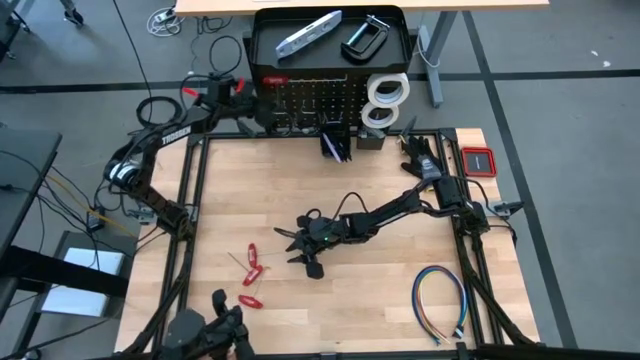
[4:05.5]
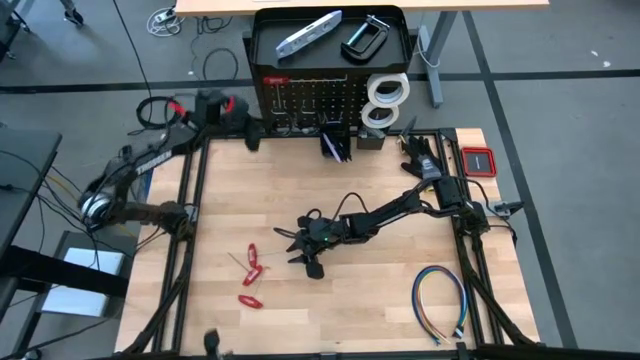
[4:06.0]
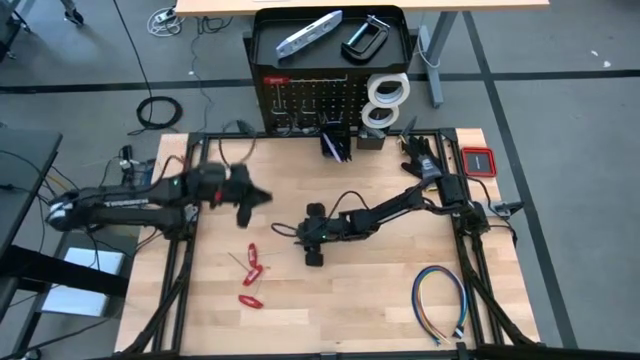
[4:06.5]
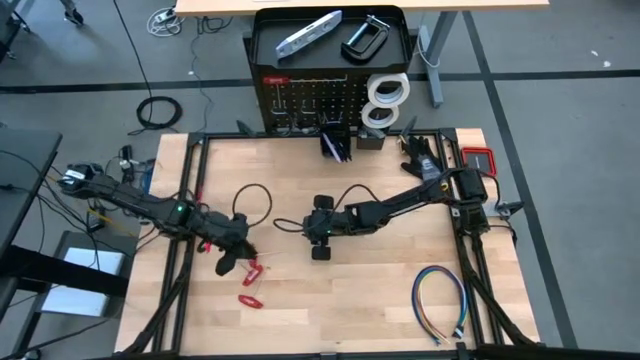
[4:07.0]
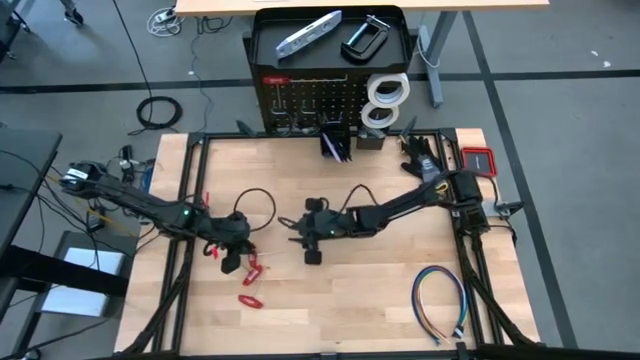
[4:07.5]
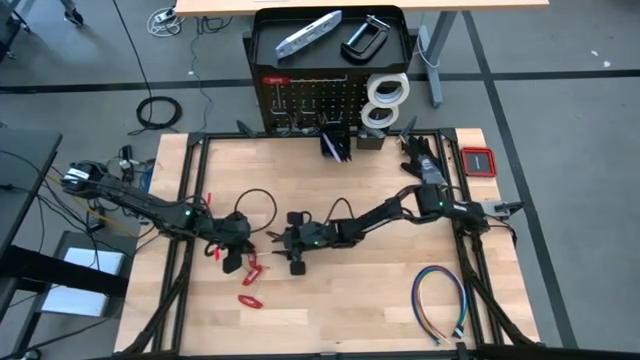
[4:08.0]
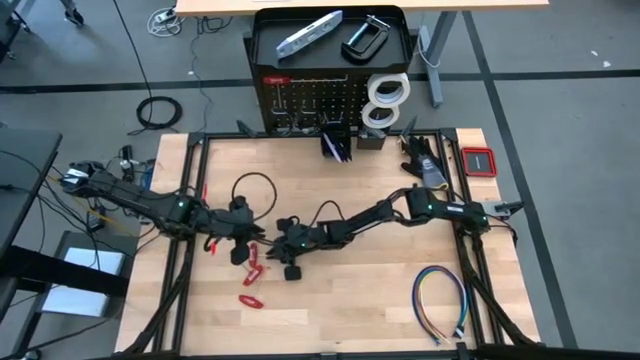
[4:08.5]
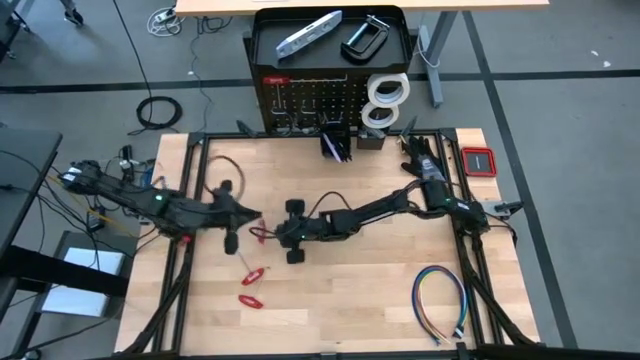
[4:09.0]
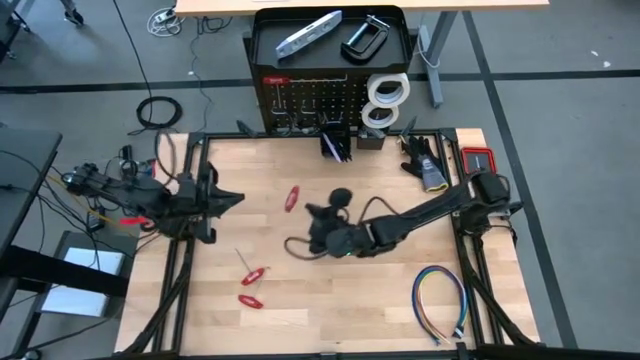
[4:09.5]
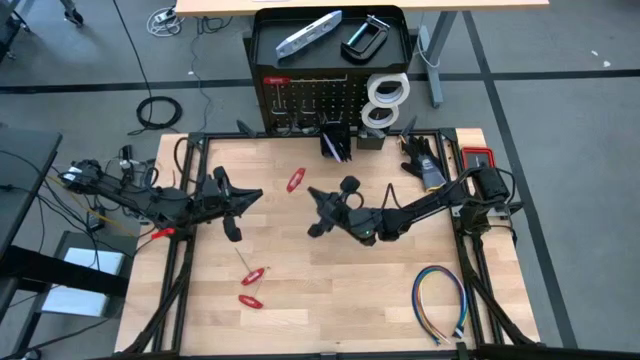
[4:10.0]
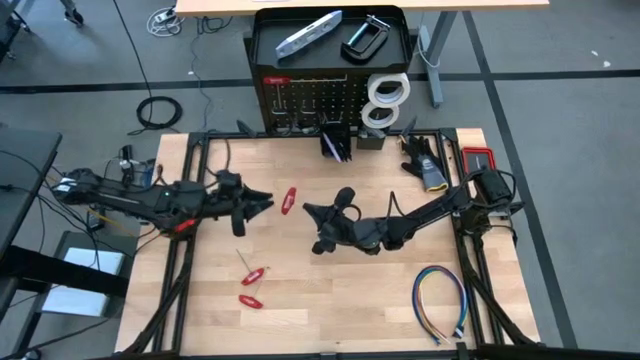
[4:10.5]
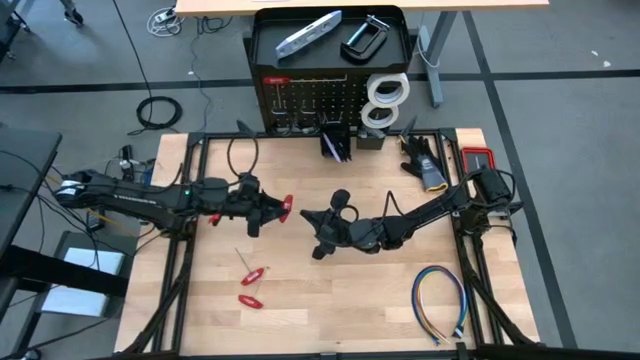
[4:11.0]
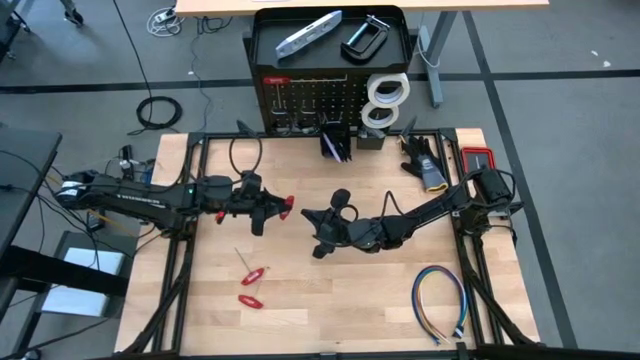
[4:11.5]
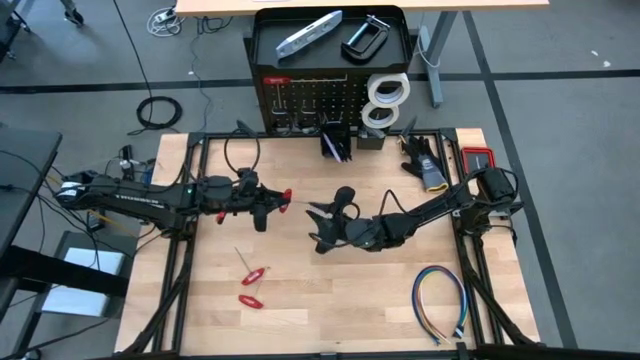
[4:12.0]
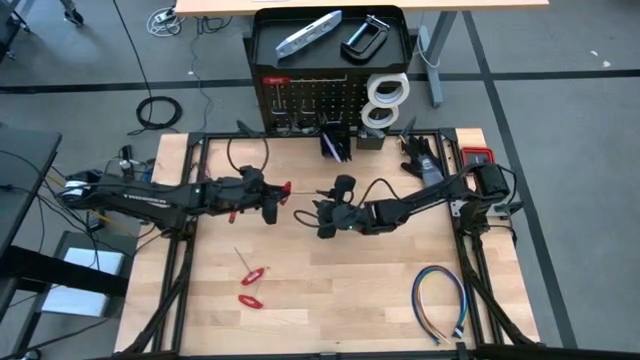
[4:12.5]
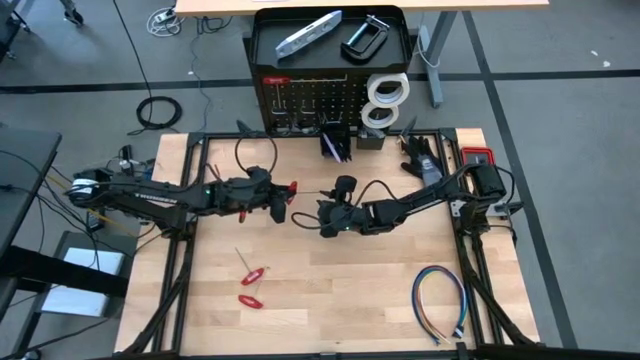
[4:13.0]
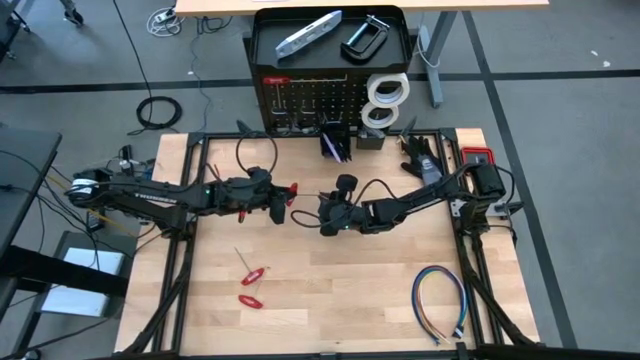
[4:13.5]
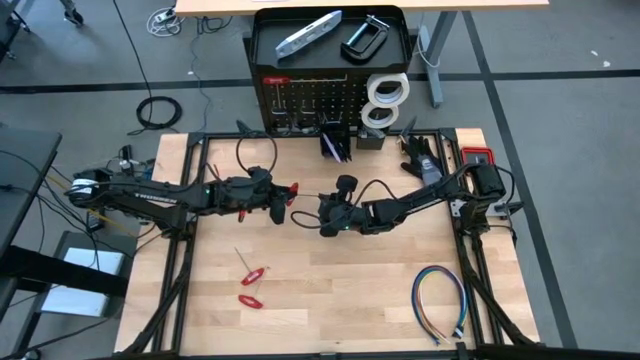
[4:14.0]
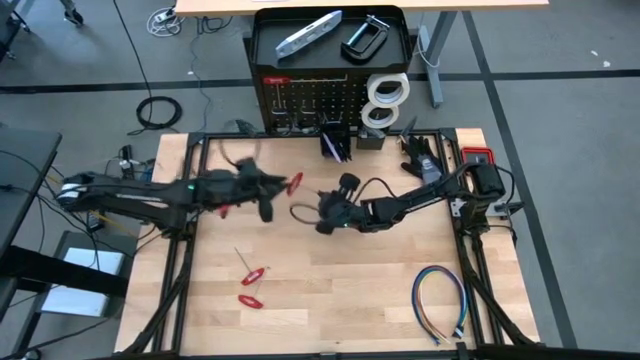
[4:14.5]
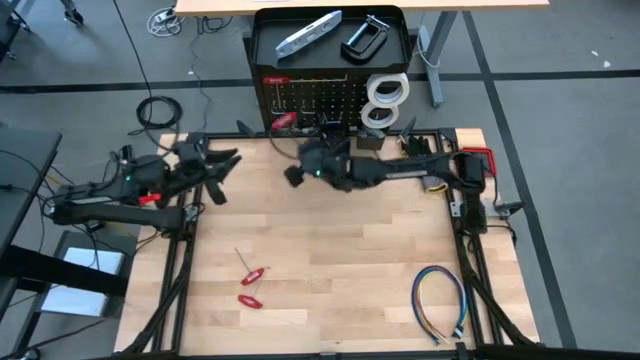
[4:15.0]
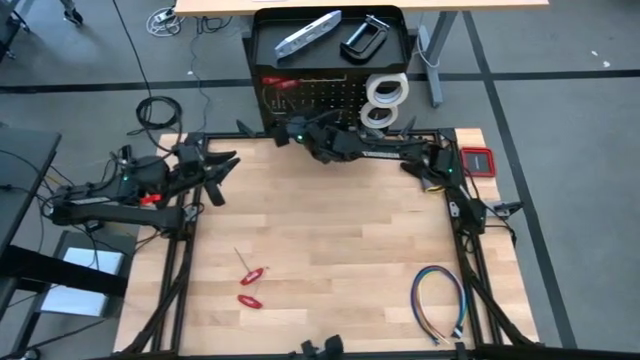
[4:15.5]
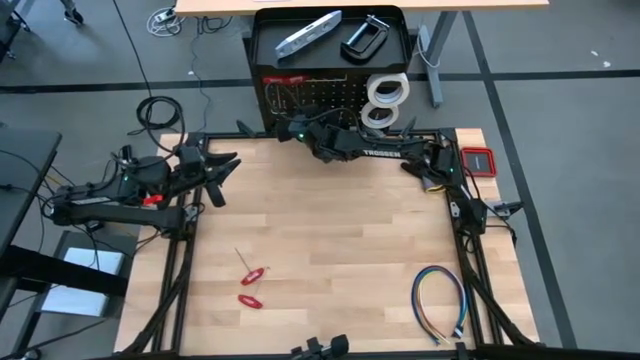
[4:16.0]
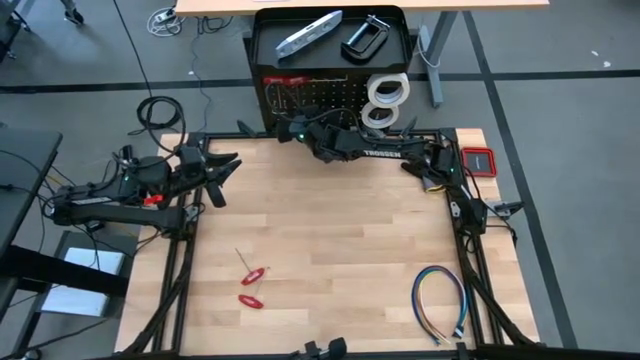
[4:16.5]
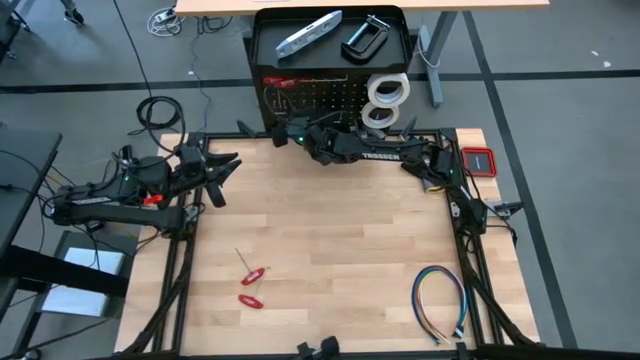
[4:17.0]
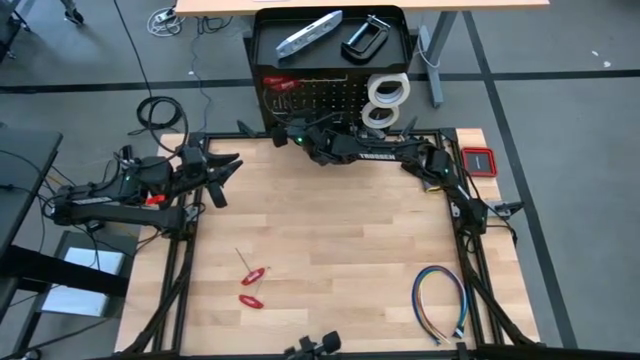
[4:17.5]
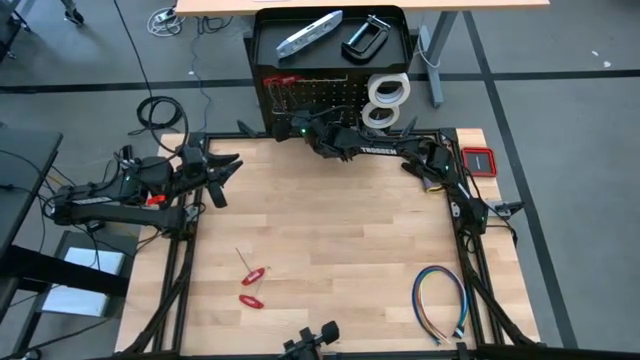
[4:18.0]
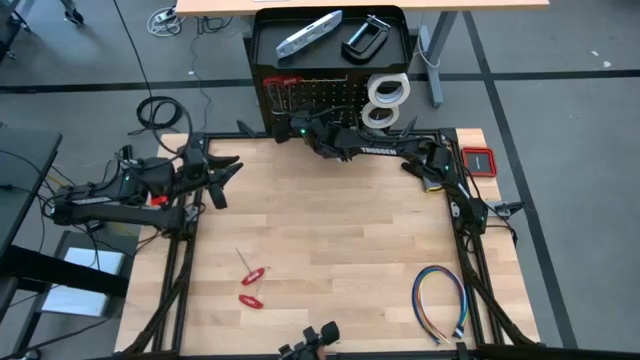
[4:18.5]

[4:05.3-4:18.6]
Task: Hang tools onto peg board
Hang the red allen wrench on the peg board

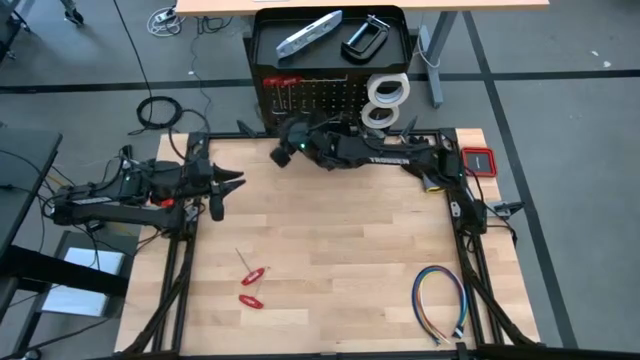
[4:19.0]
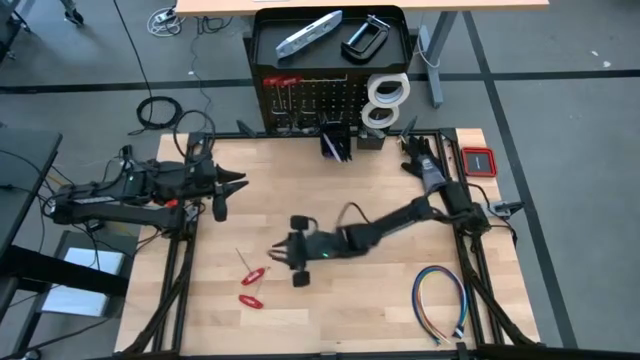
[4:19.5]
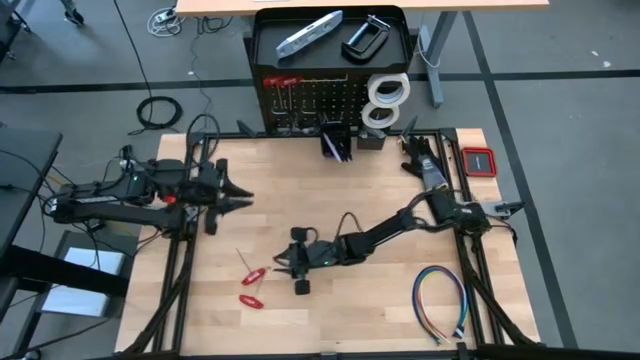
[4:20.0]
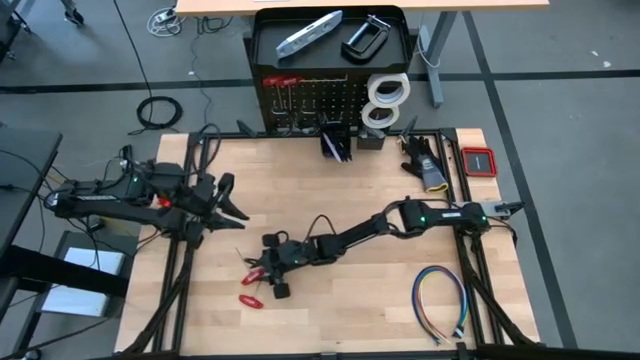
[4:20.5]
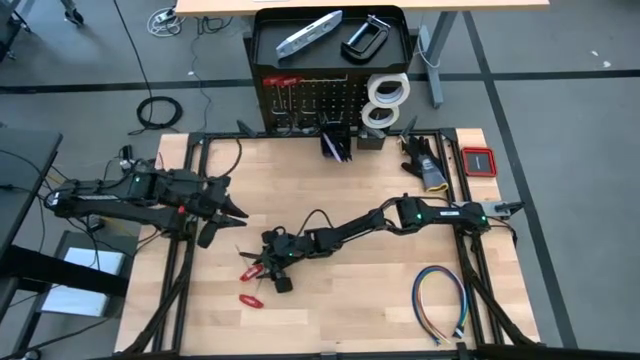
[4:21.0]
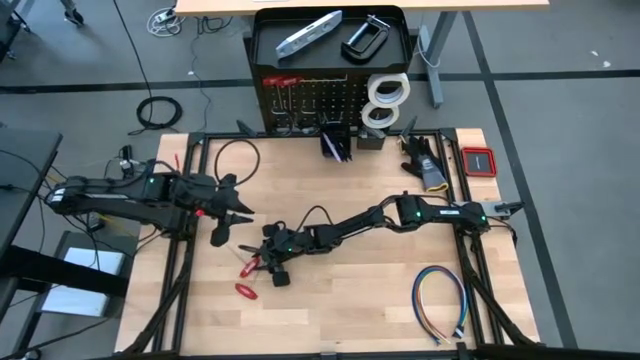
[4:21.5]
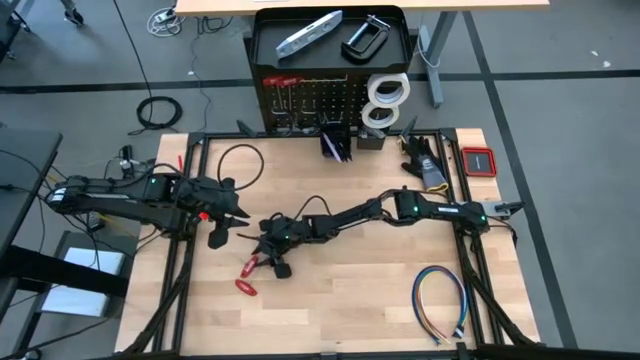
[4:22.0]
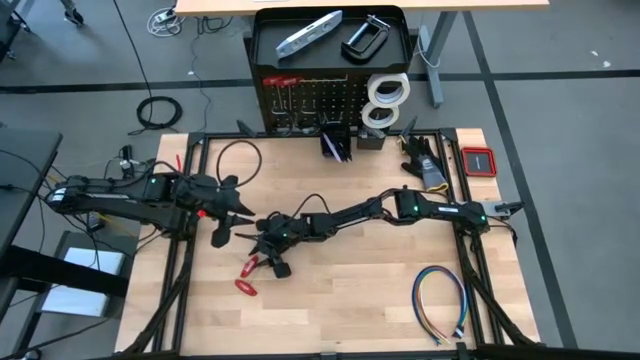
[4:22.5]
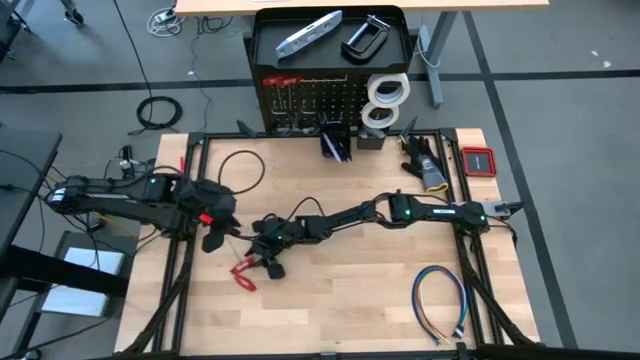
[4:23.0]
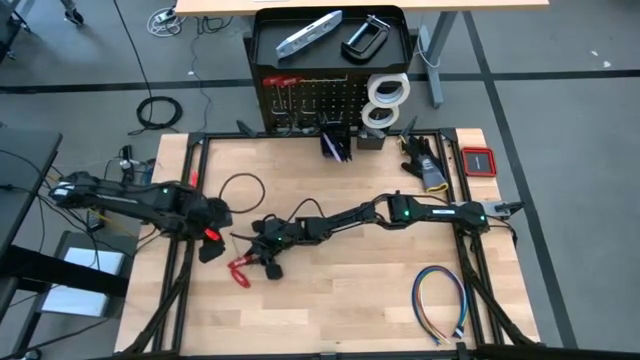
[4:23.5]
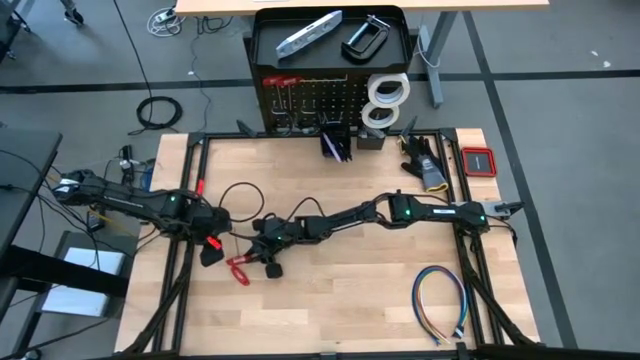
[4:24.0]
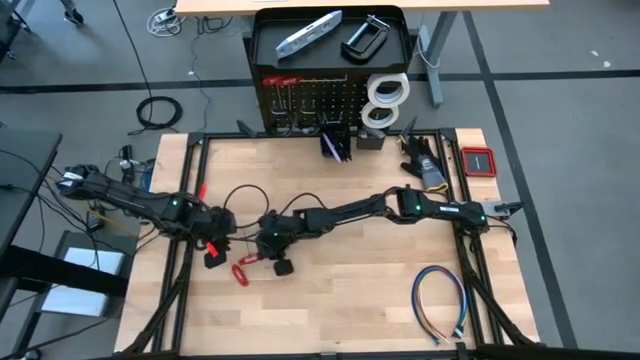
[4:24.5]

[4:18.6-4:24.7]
Hang the red allen wrench on the peg board

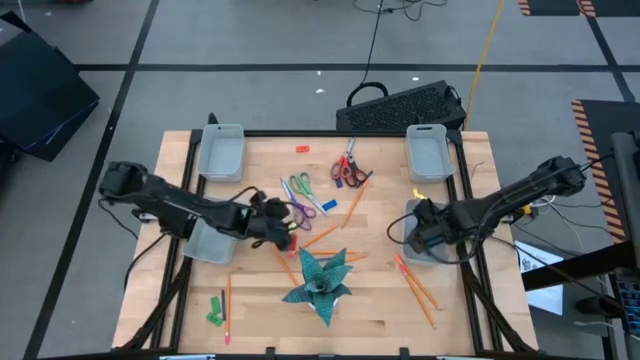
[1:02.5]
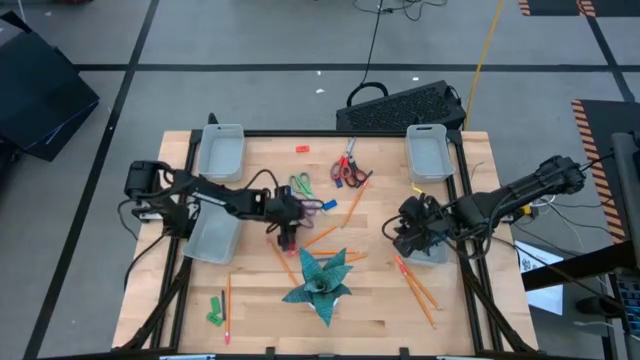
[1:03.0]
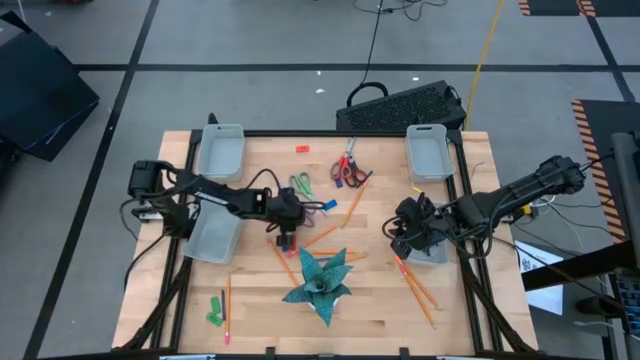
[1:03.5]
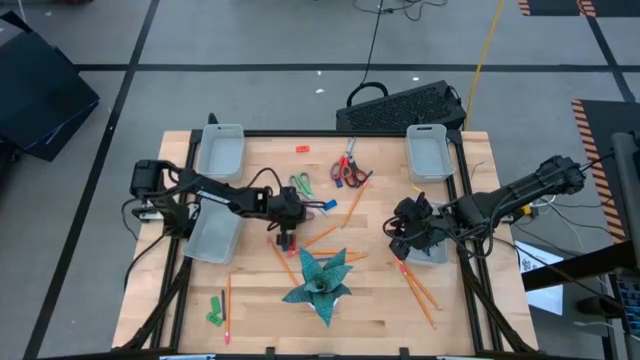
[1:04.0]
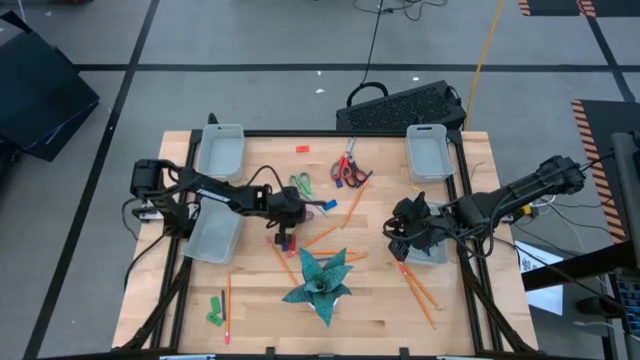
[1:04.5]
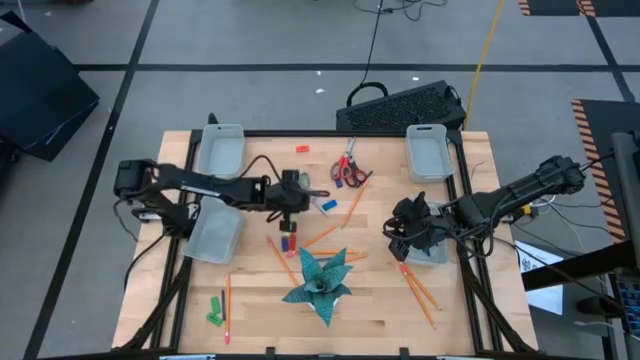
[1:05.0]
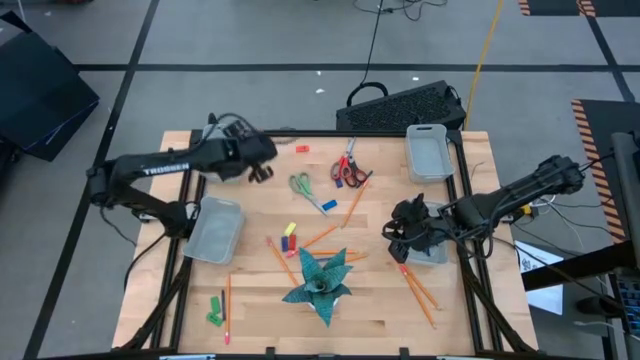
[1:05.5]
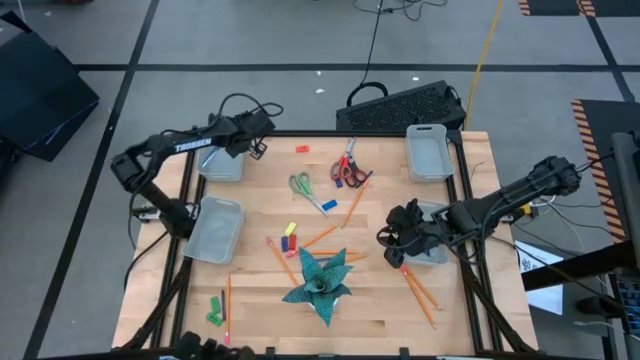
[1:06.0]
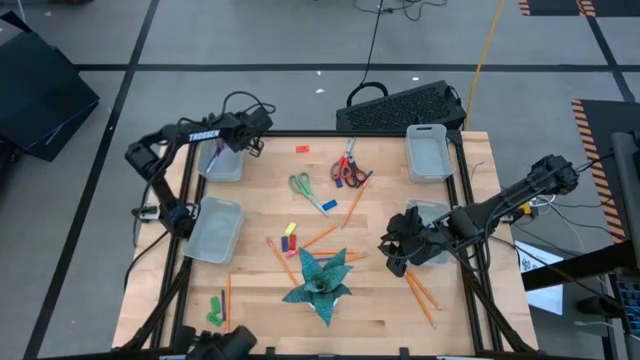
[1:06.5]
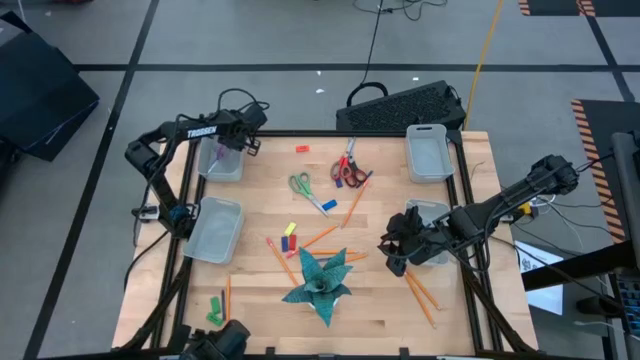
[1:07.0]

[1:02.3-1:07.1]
Task: Sort crayons/erasers/pens/pencils in bins
Put the purple scissors into the top left gray bin
